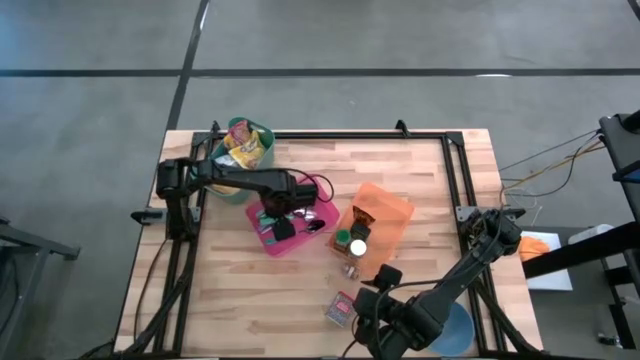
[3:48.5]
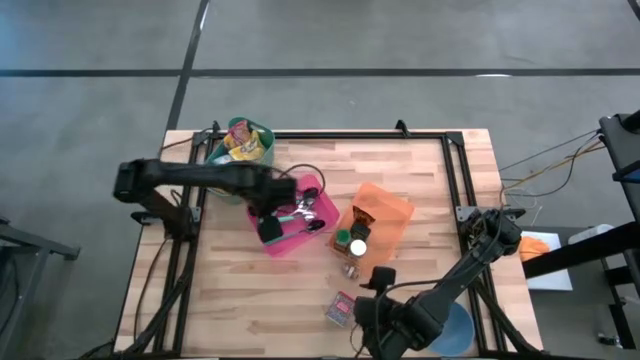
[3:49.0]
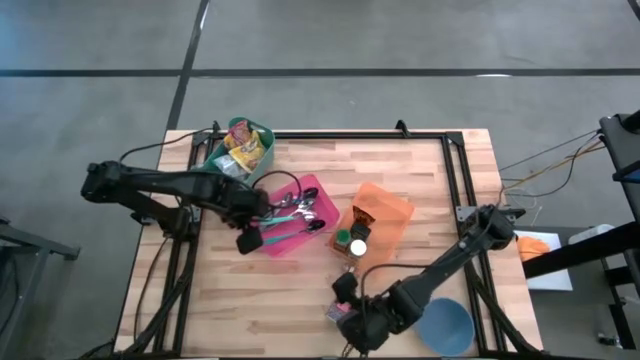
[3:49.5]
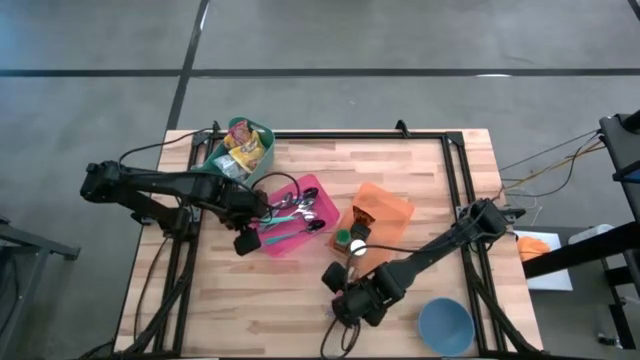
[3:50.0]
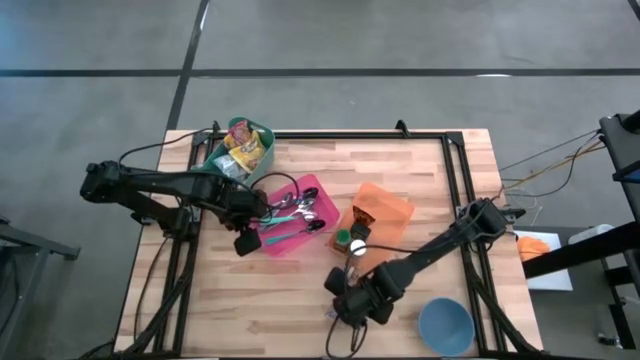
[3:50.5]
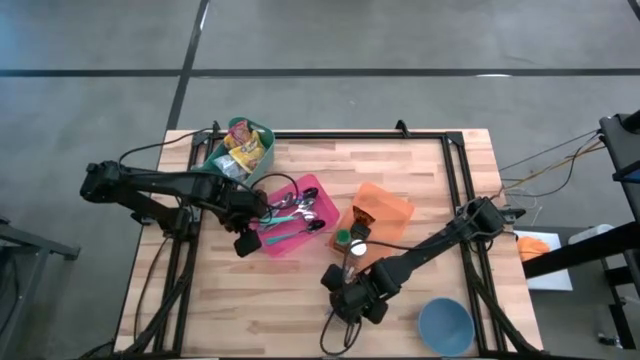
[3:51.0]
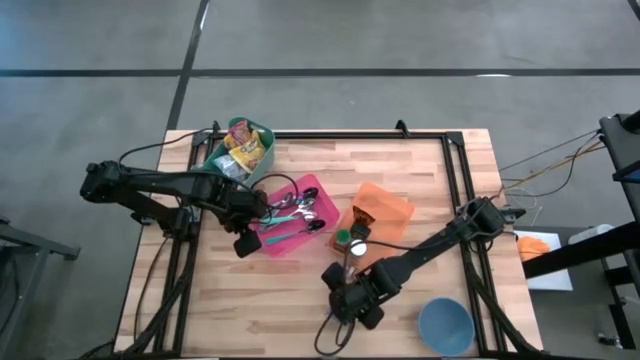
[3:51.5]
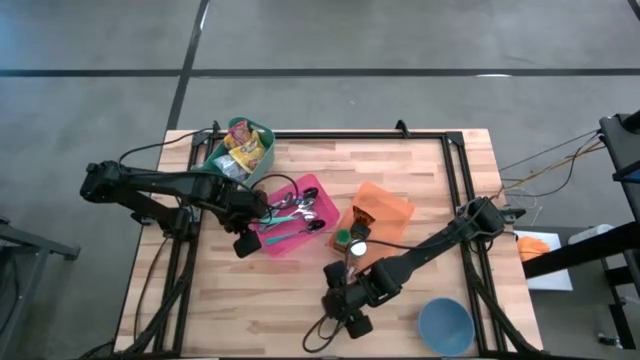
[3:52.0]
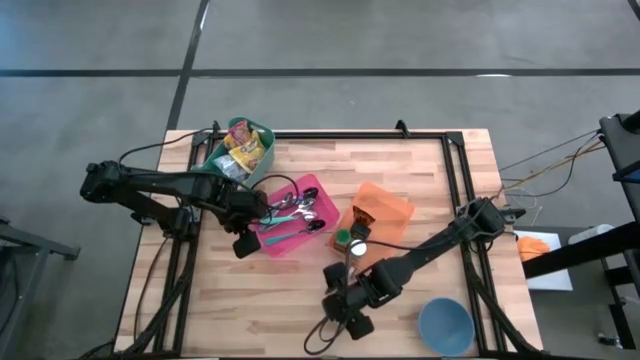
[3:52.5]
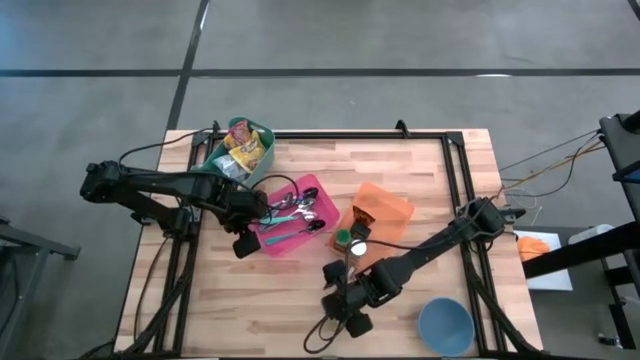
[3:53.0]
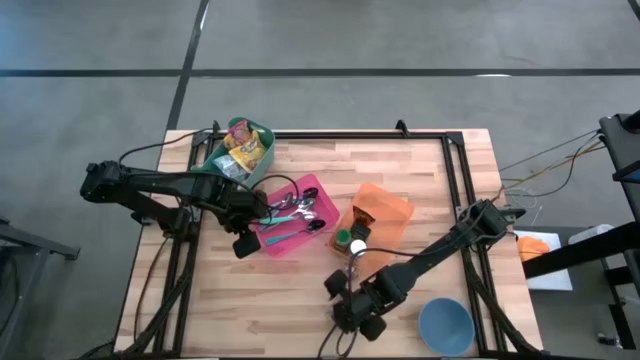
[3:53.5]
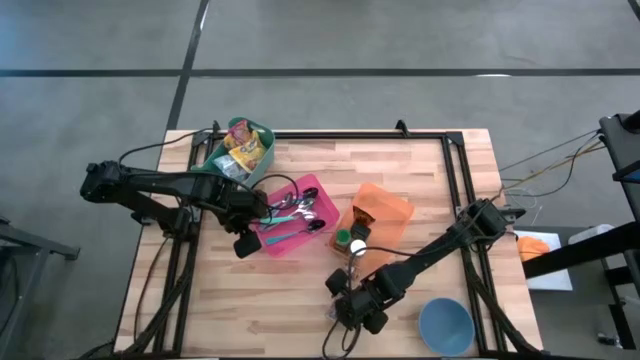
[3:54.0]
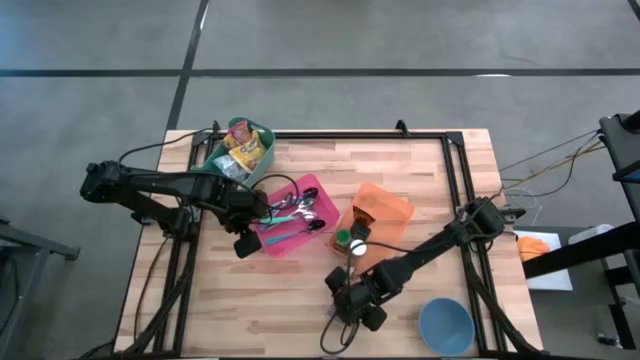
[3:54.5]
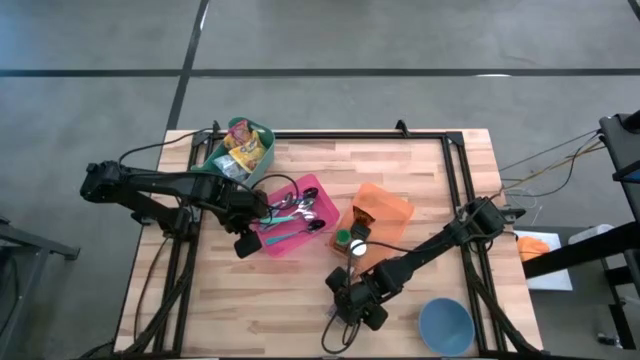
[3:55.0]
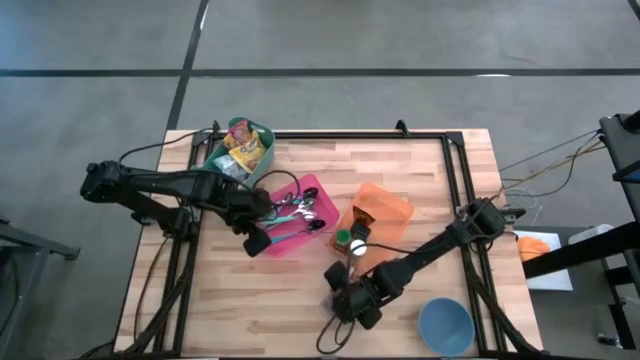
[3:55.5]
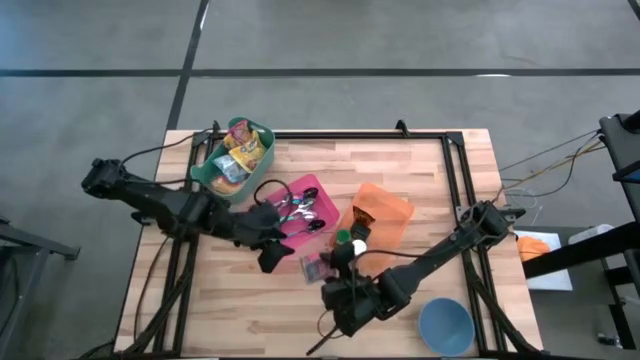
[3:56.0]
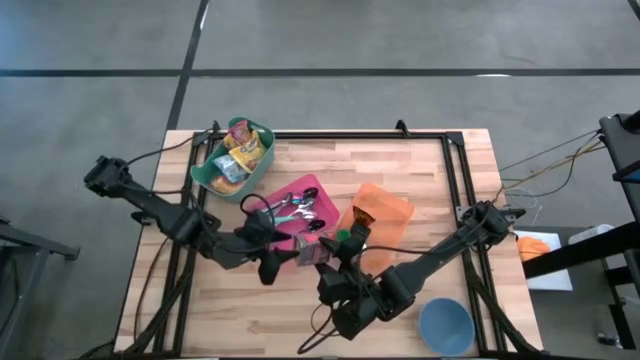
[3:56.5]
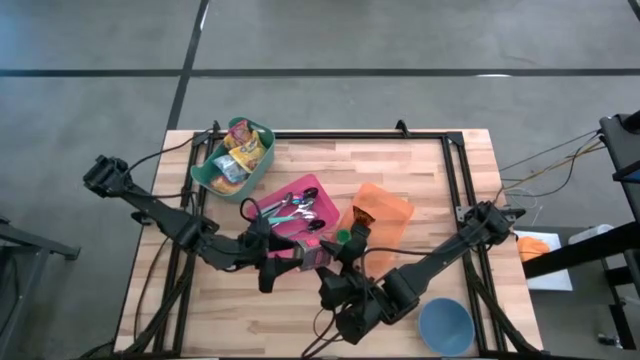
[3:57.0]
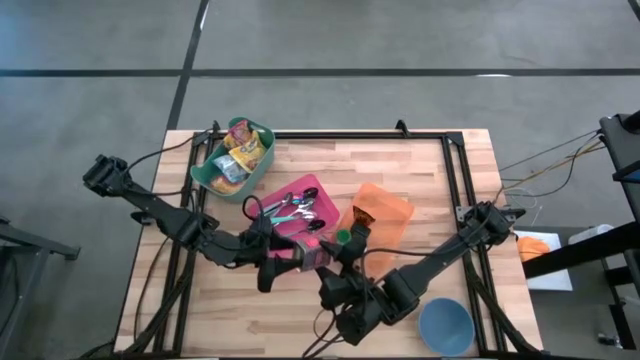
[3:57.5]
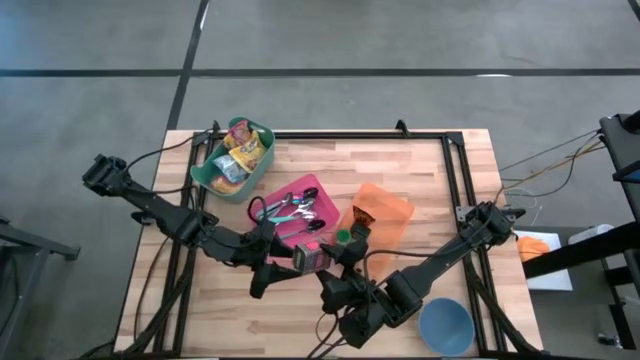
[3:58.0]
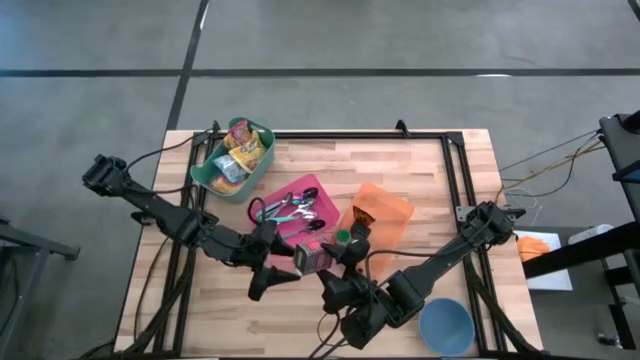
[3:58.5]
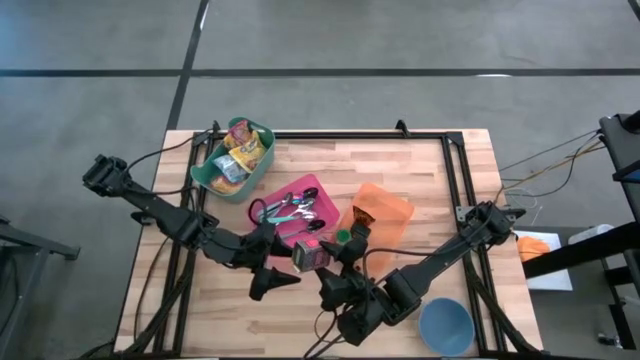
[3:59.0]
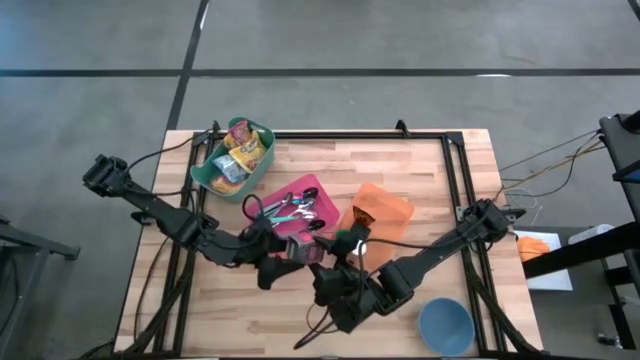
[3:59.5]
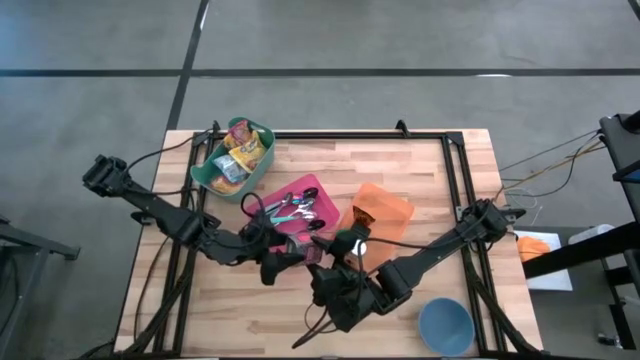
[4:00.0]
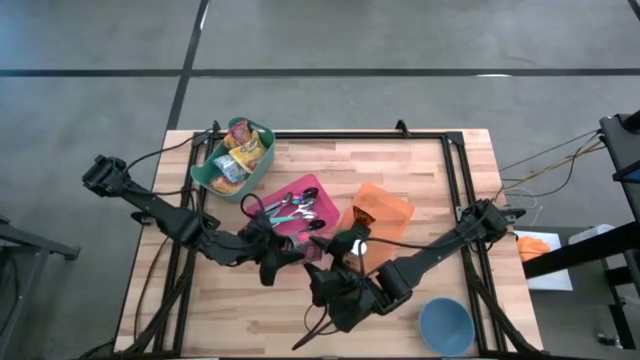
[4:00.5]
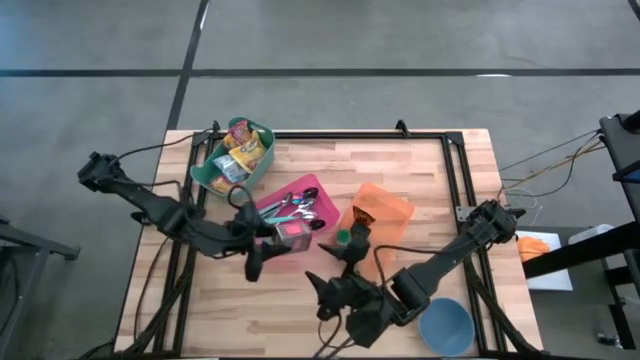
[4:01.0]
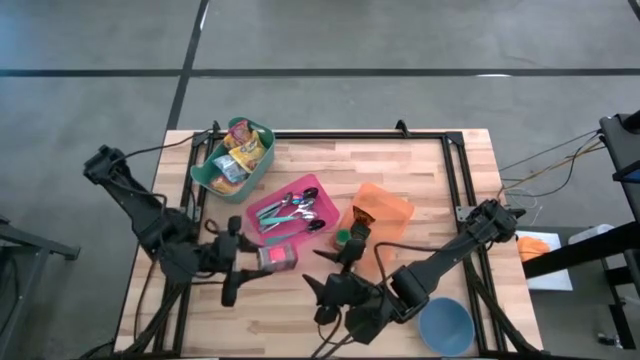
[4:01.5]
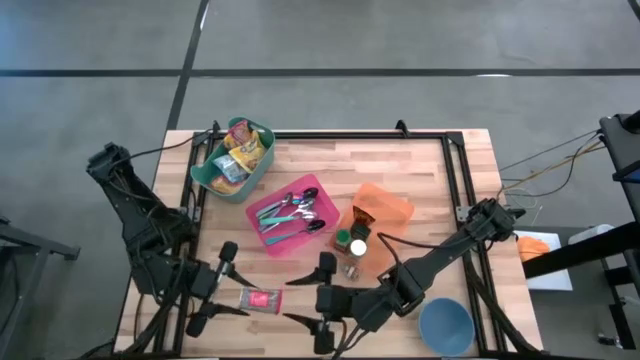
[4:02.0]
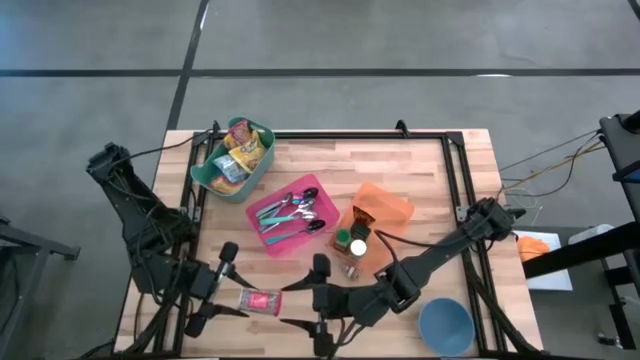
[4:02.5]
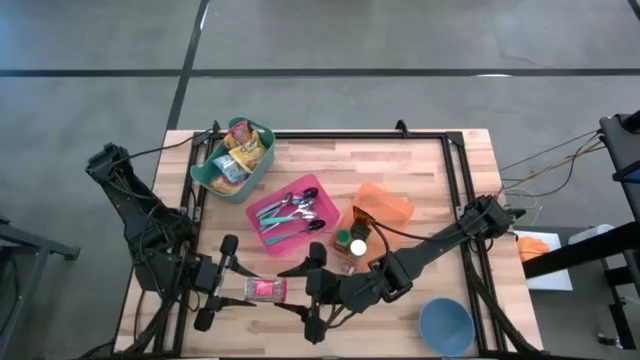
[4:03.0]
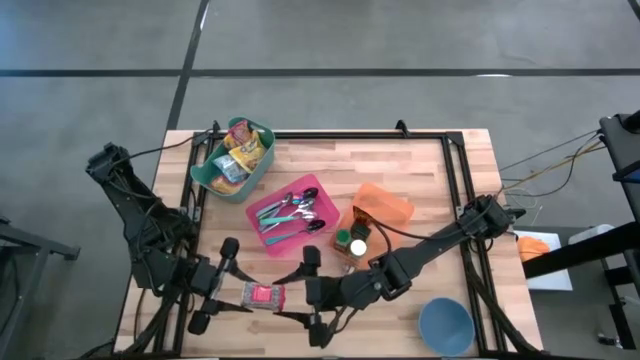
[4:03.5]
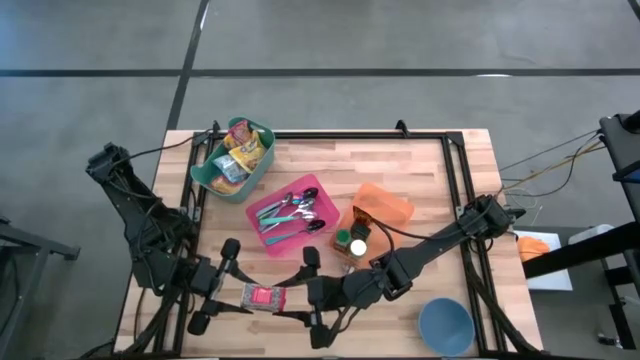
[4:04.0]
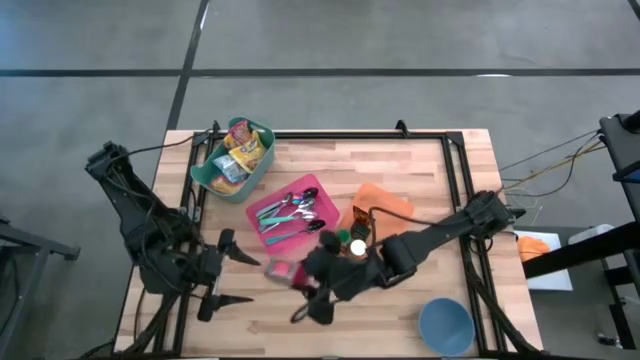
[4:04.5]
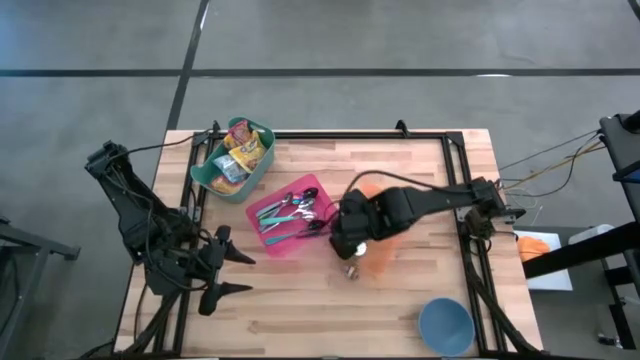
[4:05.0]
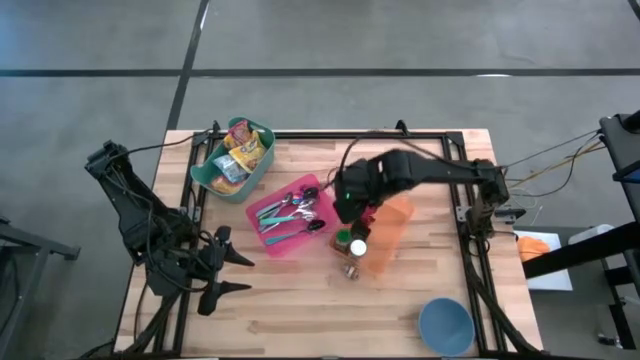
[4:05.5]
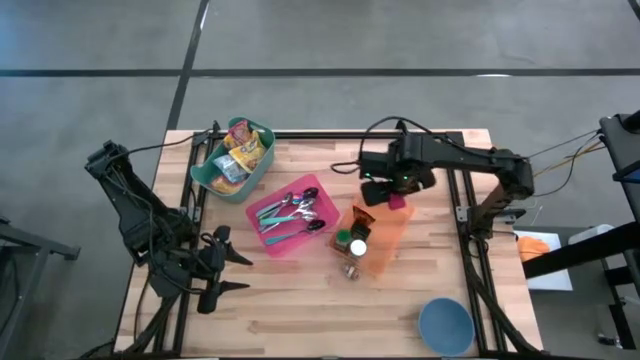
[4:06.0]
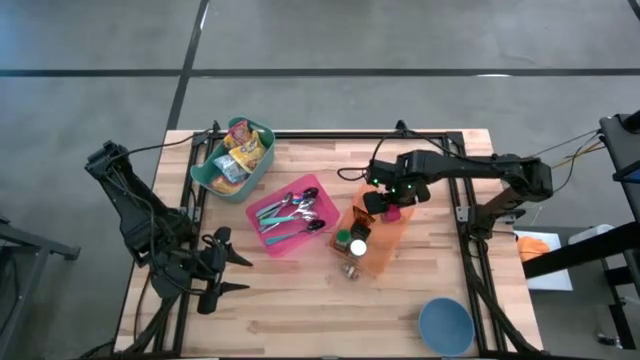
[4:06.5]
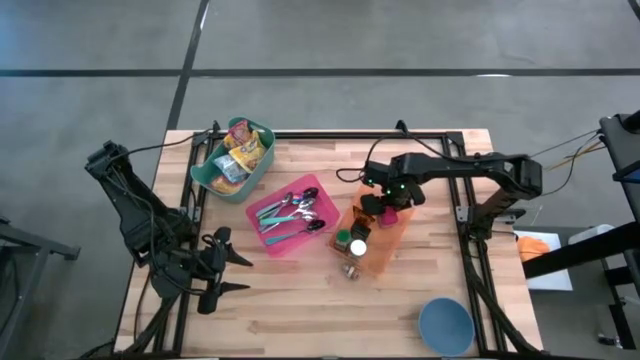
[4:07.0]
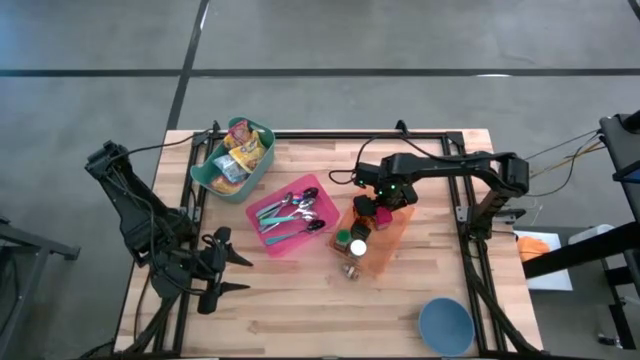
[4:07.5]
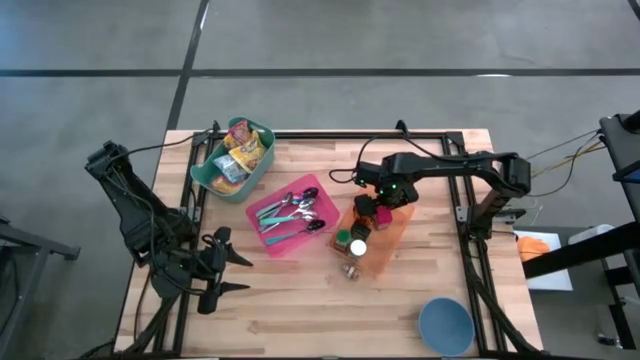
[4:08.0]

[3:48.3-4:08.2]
Put the red seasoning can into the orange bin

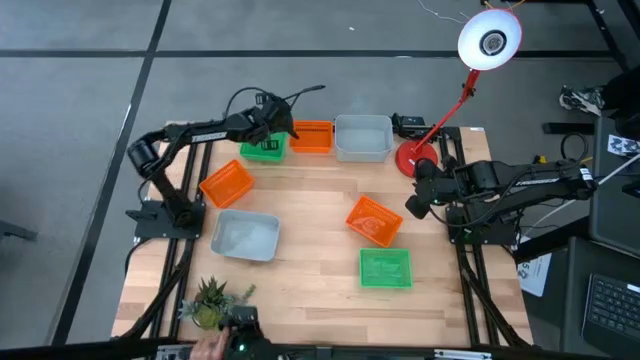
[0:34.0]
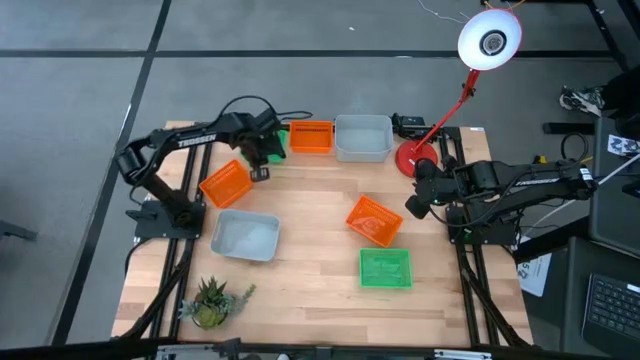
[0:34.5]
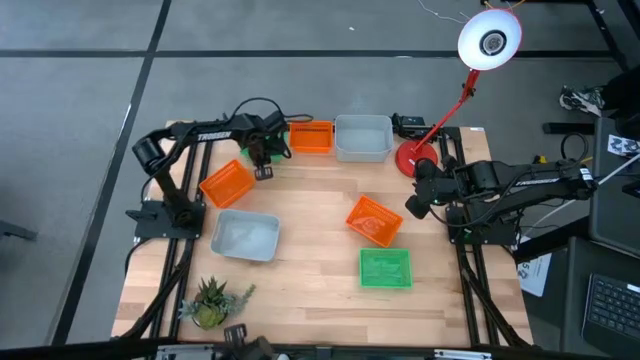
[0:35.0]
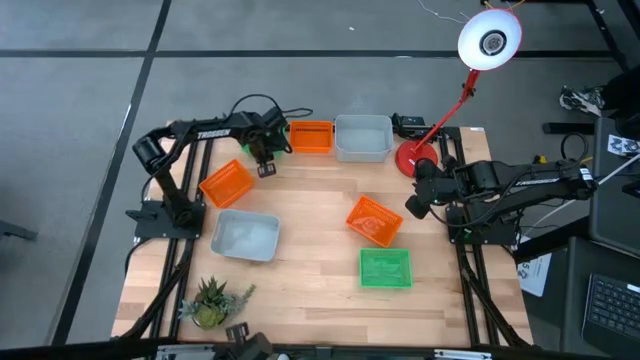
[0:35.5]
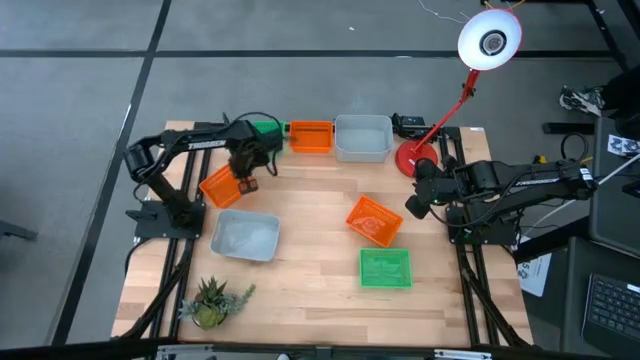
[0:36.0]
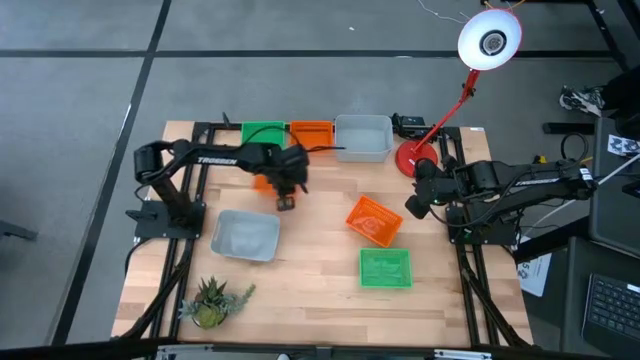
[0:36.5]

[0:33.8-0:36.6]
Adjust the middle orange bin on the table
